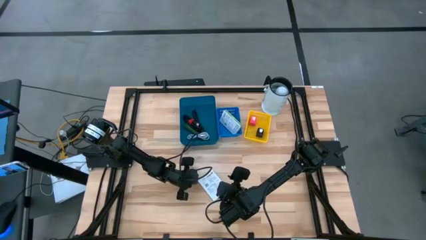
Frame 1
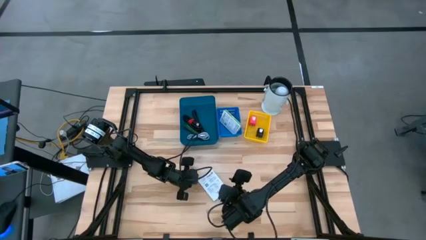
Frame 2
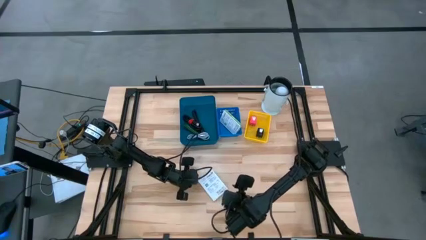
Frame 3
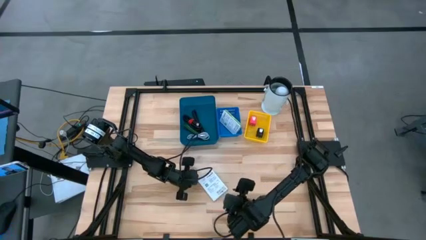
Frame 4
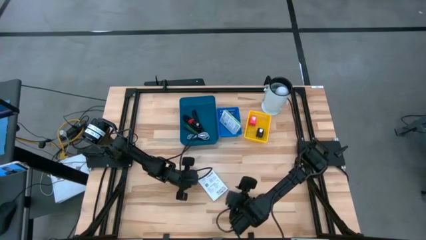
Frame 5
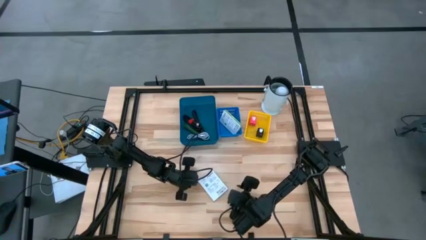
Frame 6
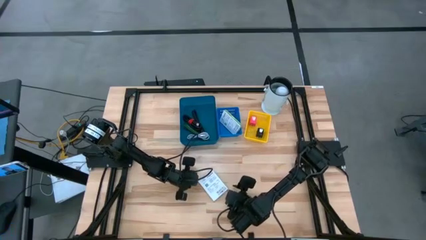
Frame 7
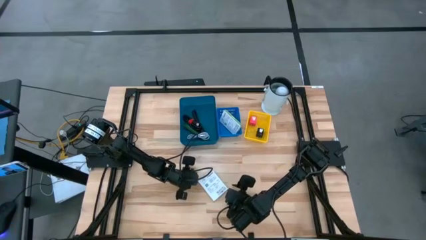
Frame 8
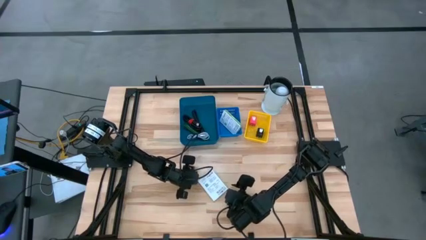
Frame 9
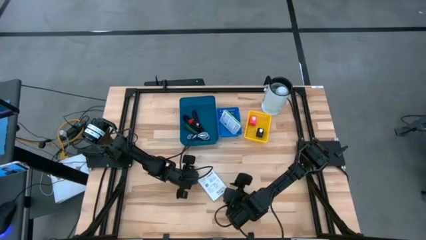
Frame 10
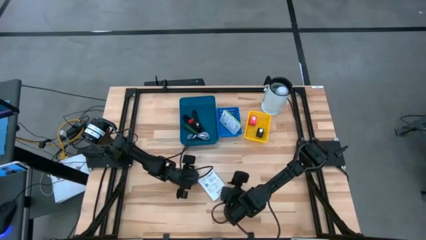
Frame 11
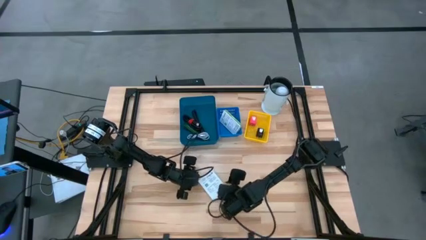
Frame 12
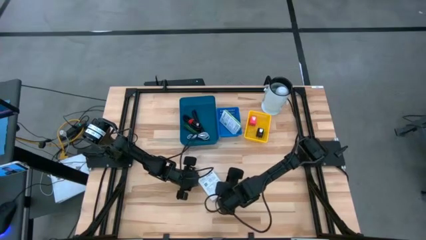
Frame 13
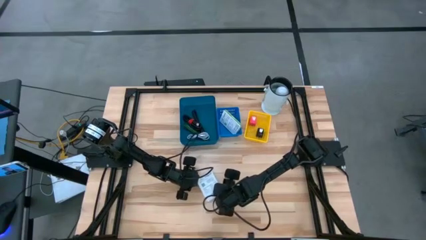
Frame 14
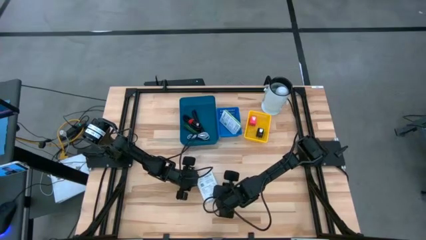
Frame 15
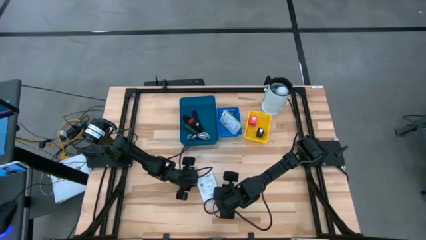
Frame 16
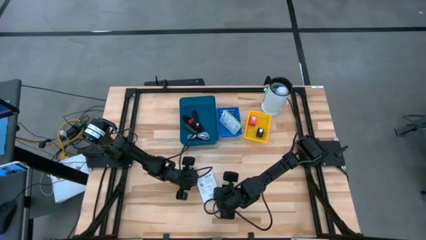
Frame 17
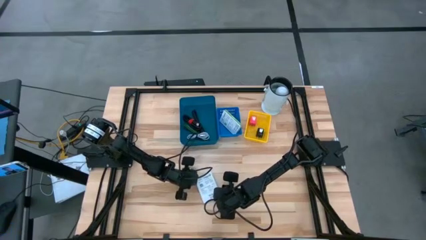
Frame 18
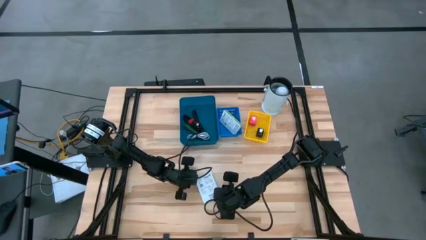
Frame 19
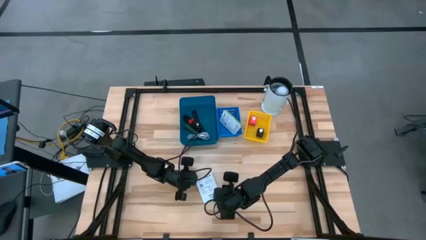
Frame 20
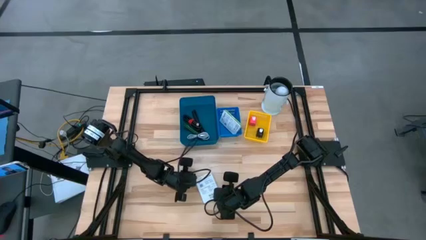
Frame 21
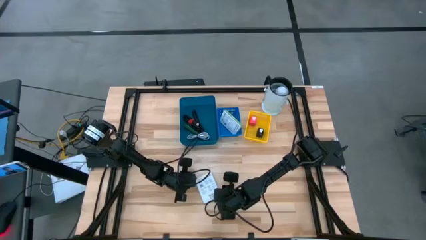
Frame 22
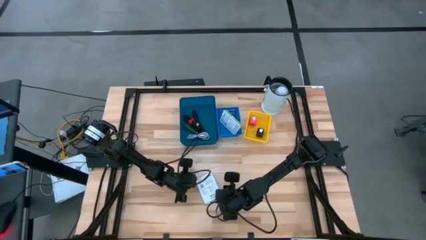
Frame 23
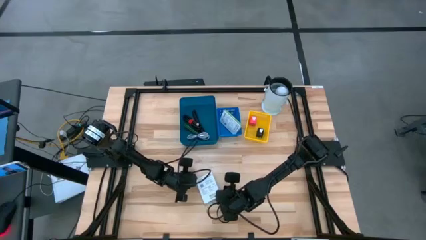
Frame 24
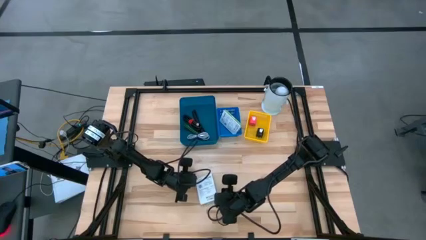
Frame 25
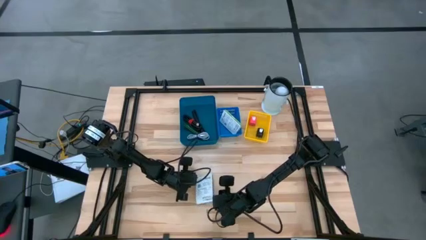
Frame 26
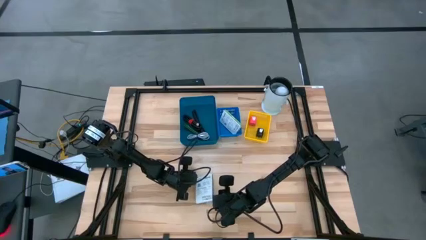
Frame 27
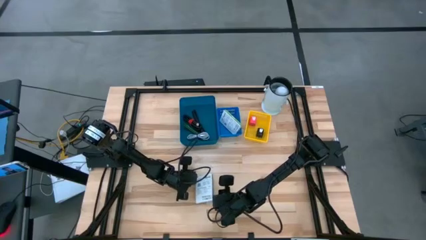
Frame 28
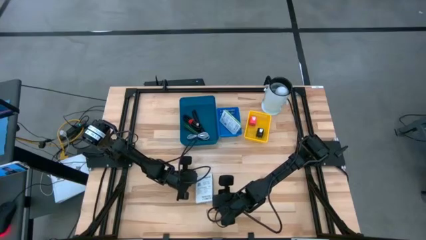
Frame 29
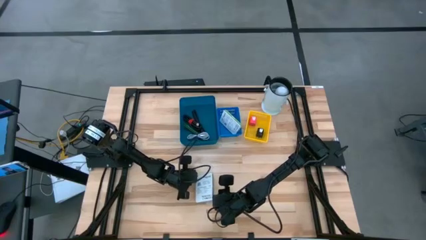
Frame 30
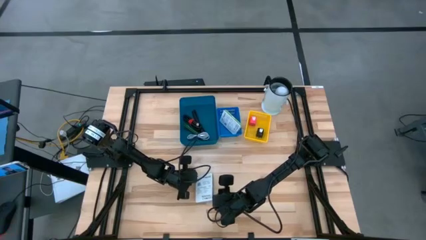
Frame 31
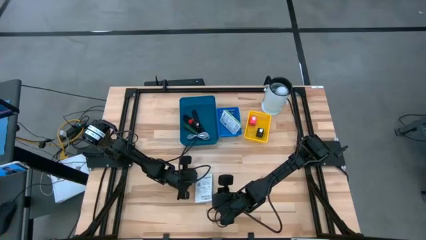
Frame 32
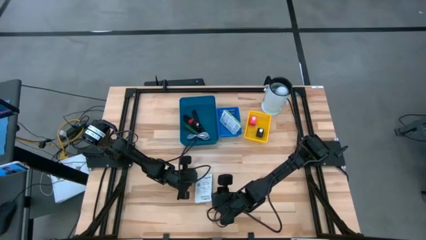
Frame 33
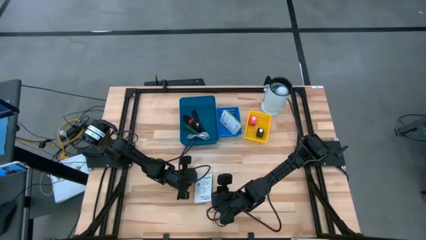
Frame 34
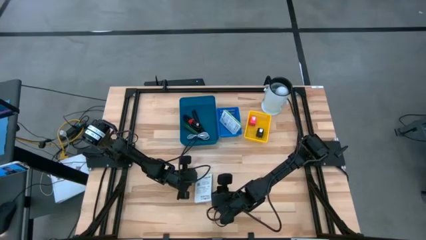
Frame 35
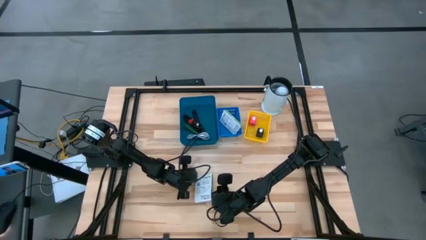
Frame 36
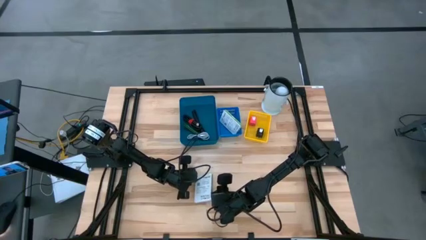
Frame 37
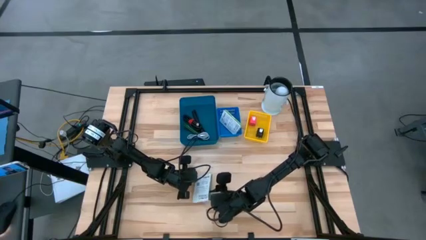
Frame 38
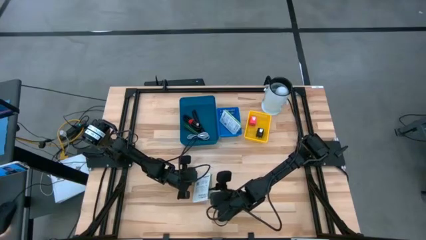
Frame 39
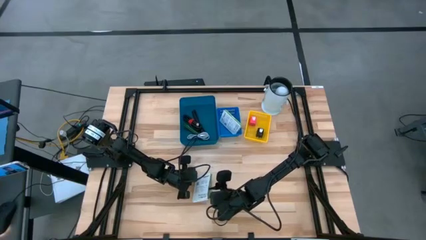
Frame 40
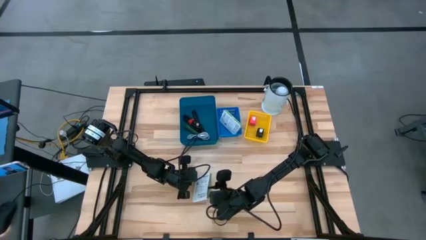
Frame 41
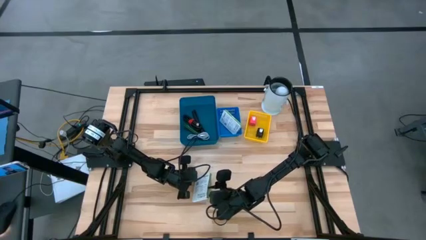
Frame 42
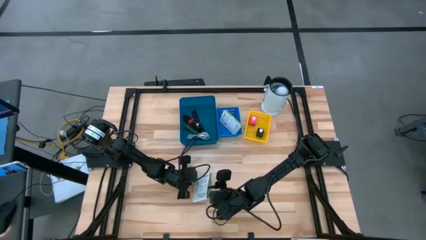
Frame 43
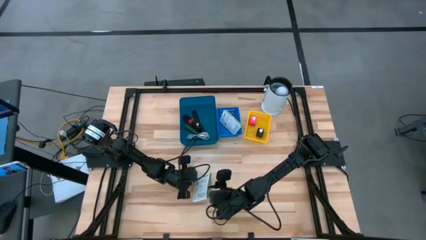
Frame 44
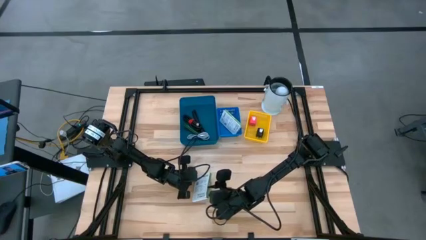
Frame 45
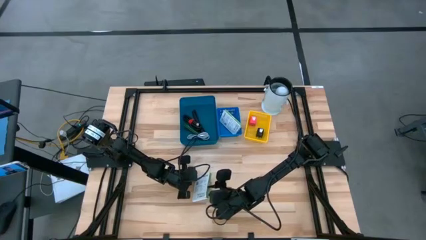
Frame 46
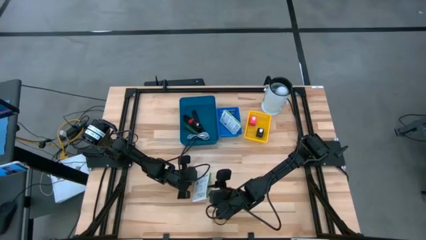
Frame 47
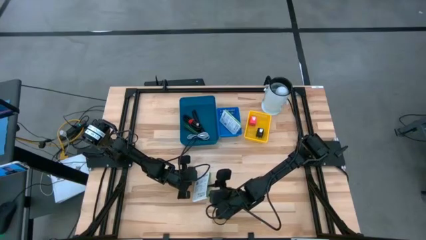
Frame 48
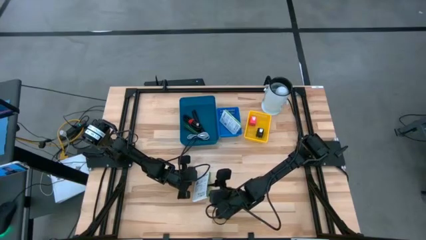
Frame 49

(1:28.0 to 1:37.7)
Task: Pick and place items into bin
Put the white card reader box into the blue bin

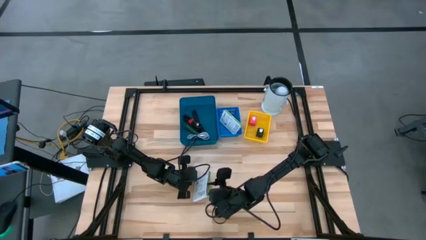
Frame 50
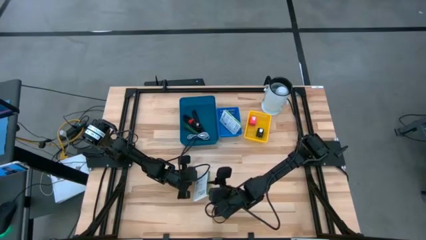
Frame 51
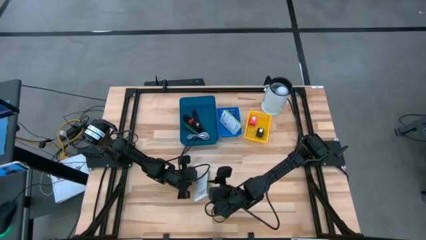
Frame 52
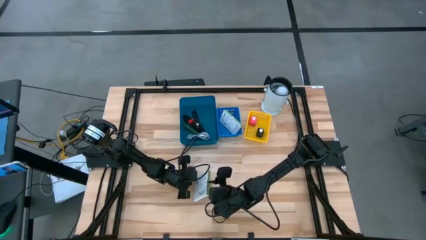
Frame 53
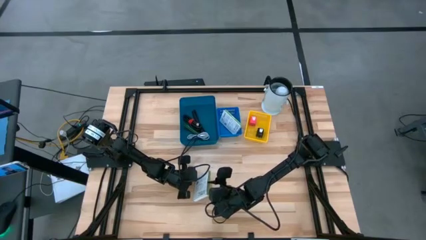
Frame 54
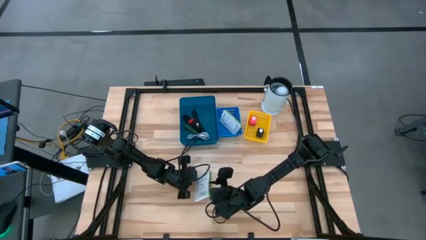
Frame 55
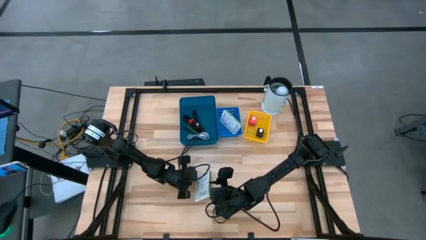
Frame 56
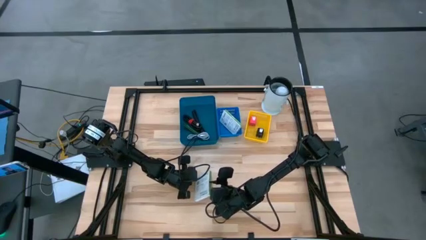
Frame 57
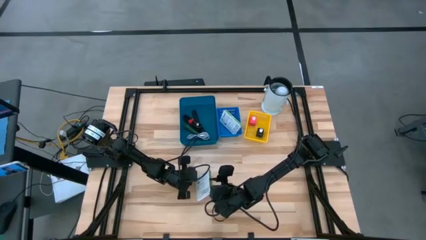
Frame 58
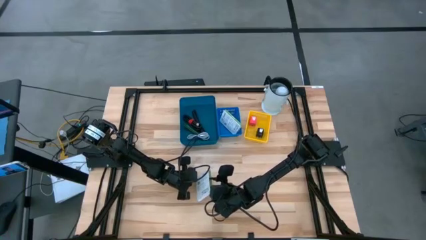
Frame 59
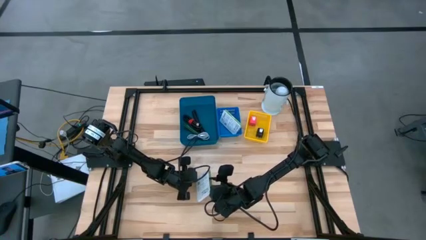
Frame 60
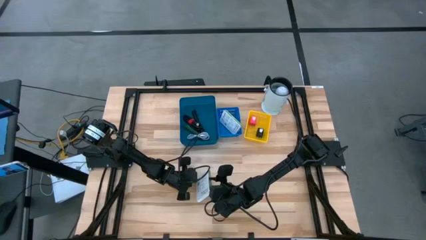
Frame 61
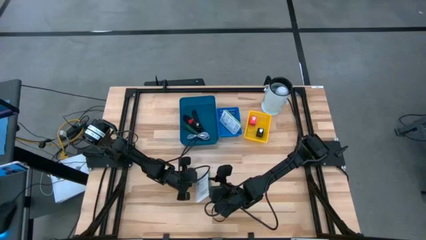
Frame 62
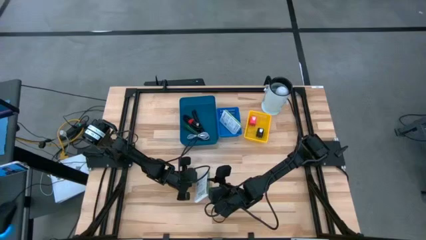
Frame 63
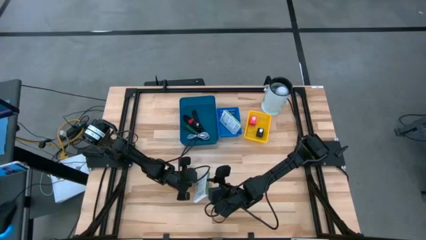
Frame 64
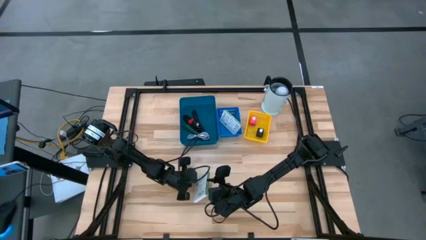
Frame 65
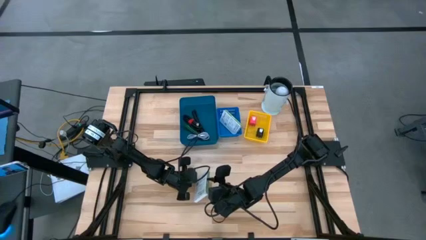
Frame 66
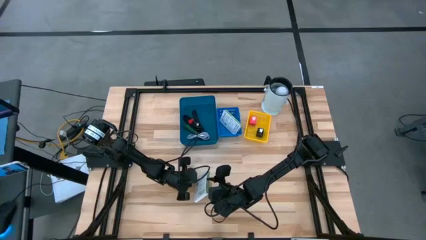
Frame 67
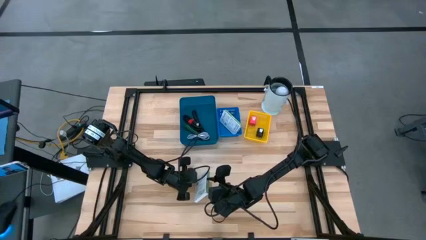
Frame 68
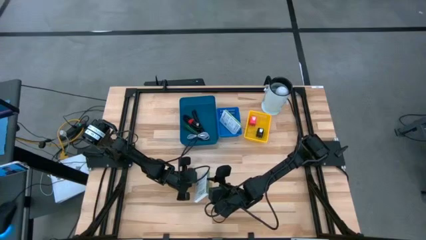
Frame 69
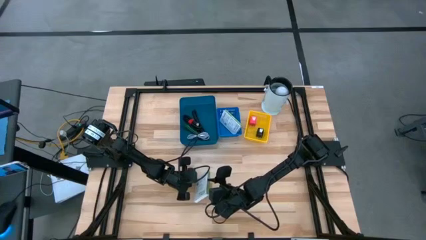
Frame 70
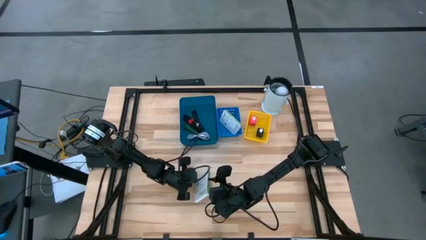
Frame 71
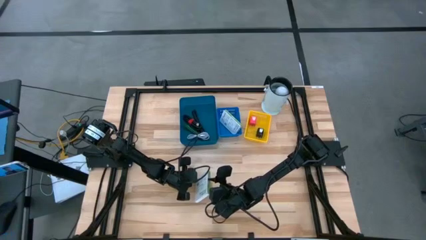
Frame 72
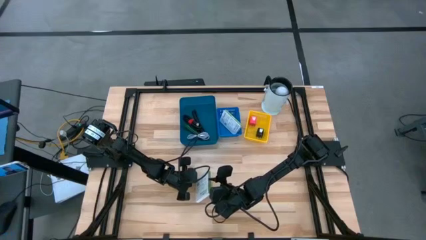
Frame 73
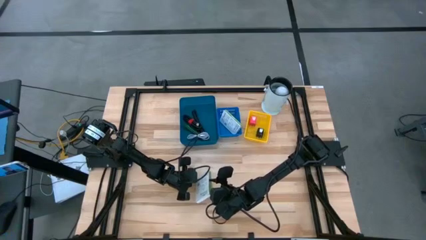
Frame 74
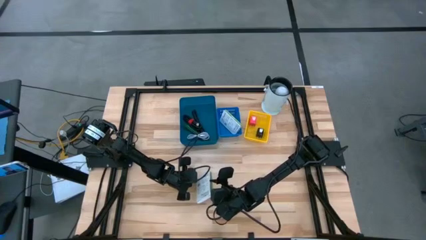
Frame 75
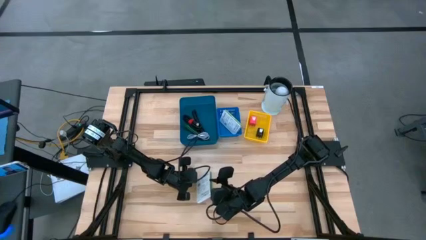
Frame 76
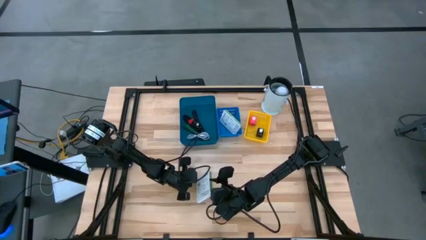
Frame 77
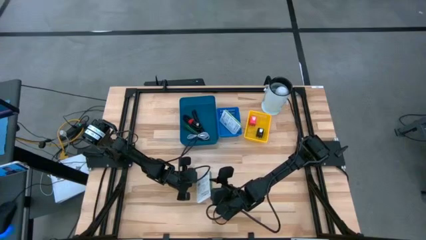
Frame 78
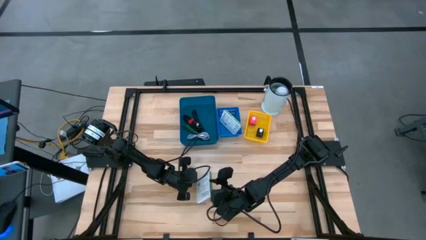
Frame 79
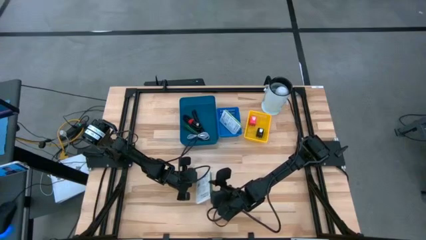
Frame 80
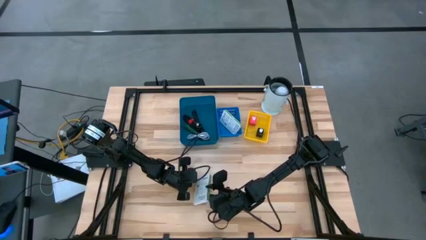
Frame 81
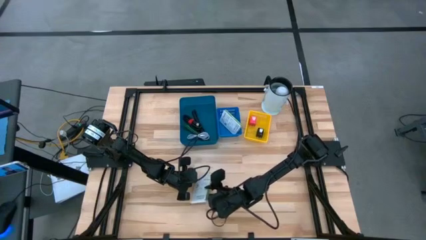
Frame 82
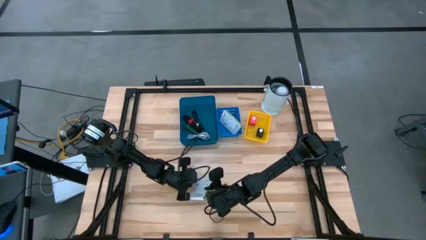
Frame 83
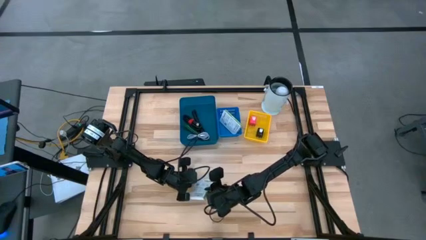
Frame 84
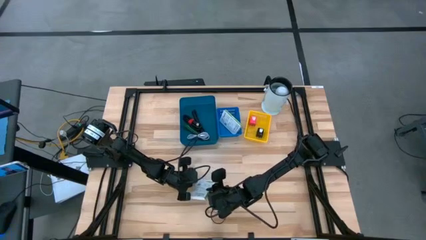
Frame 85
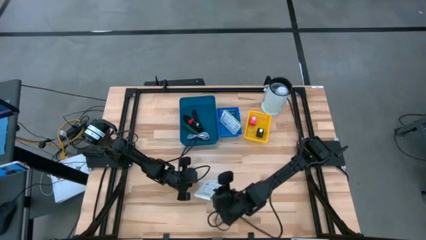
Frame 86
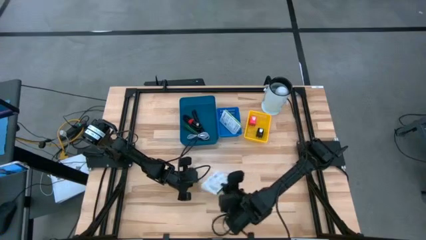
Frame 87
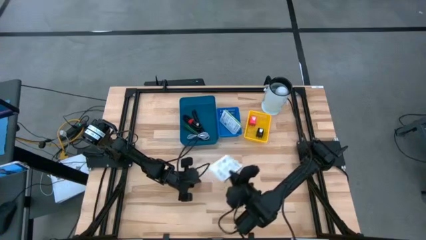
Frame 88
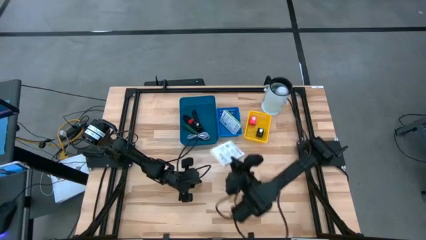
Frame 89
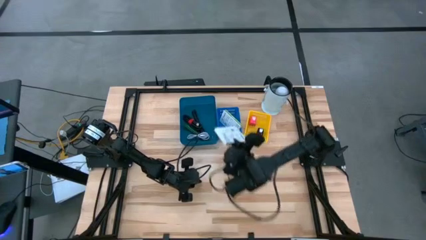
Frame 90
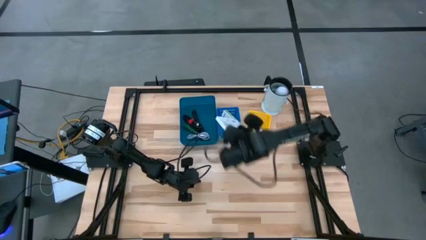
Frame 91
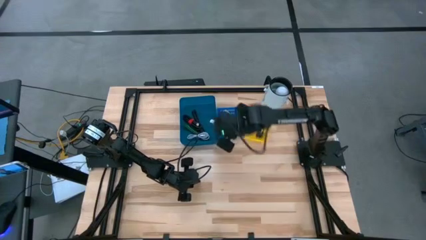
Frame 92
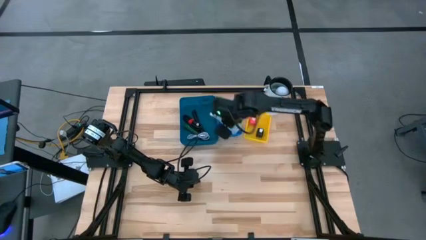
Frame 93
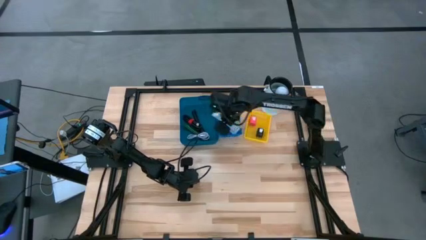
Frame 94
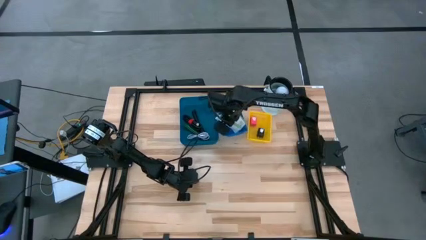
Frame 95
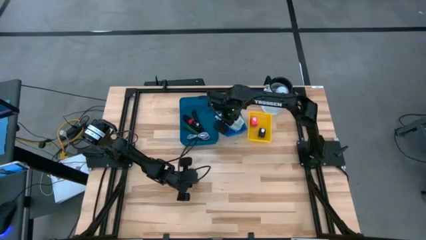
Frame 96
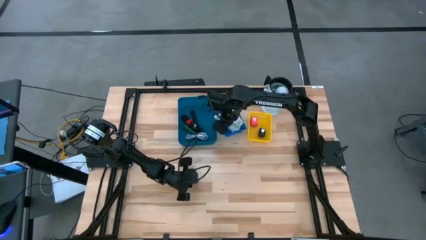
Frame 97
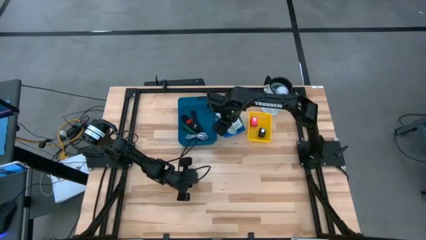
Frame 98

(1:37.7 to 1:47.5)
Put the white card reader box into the blue bin
